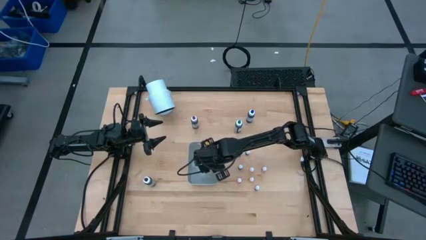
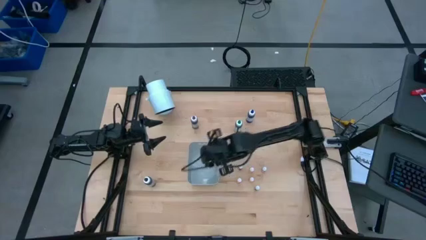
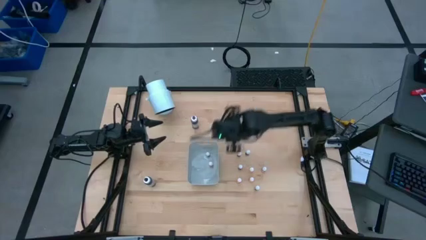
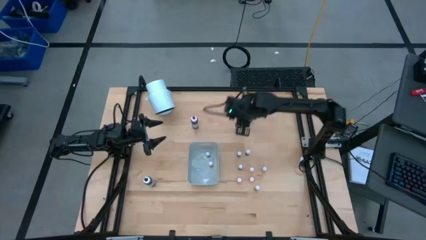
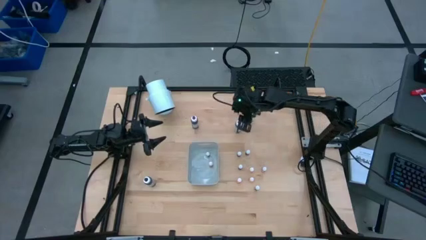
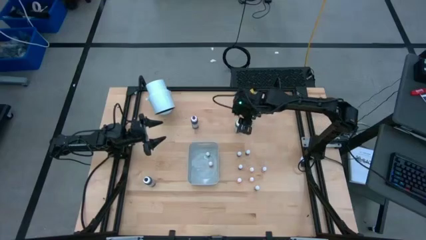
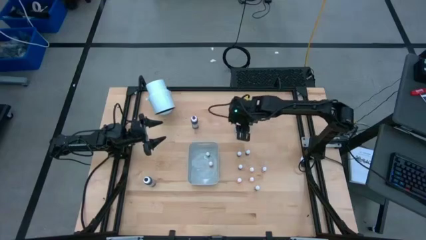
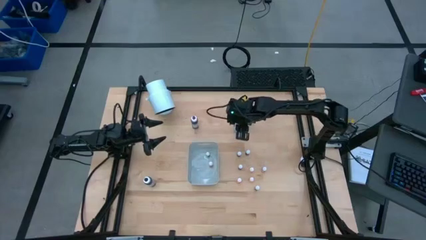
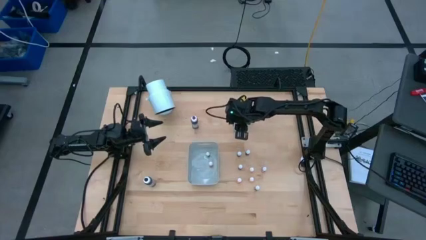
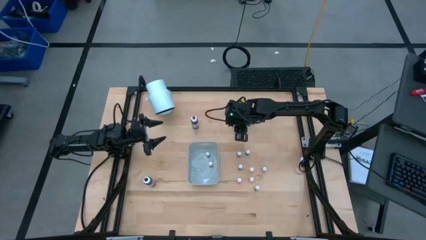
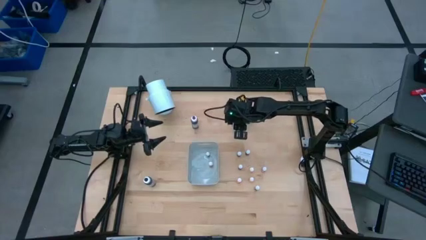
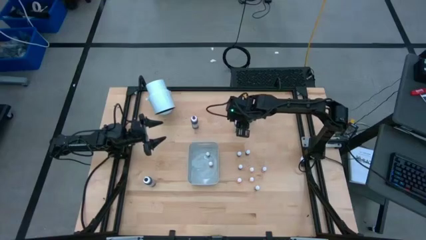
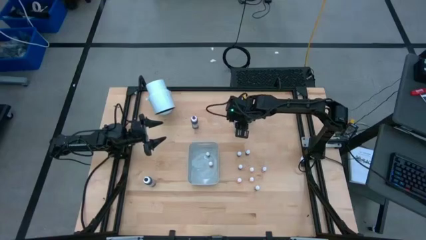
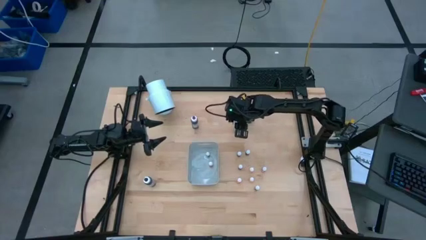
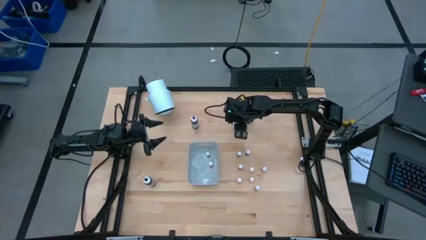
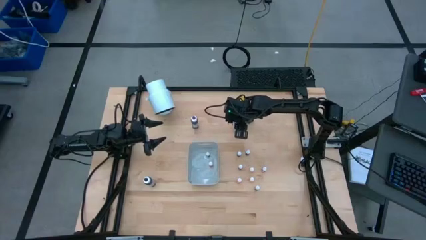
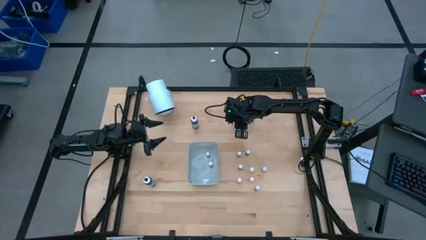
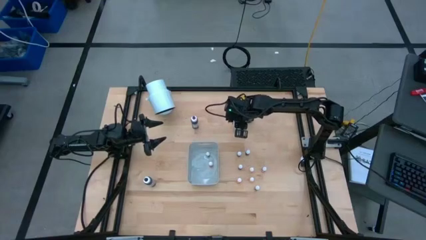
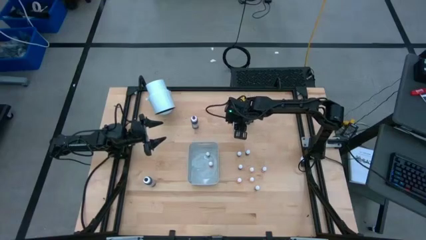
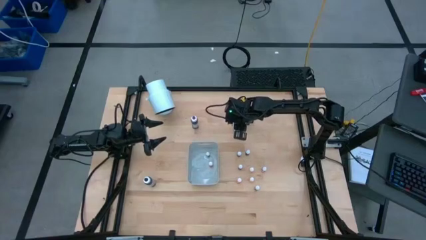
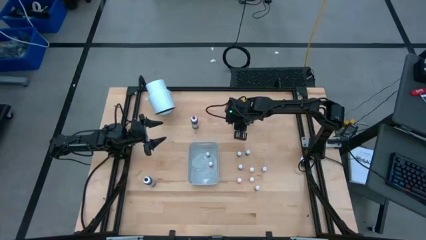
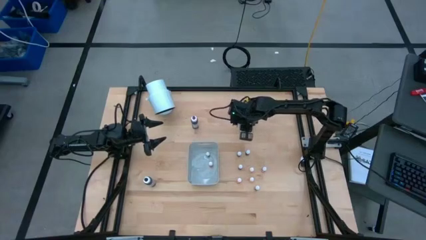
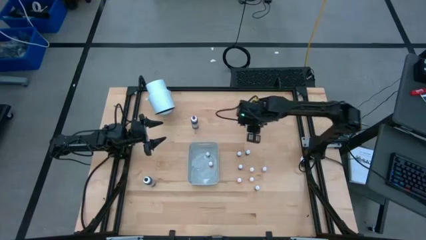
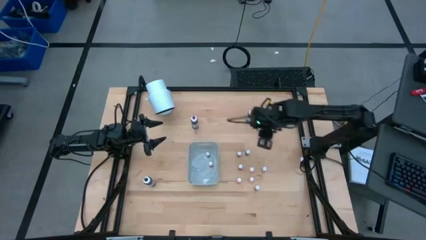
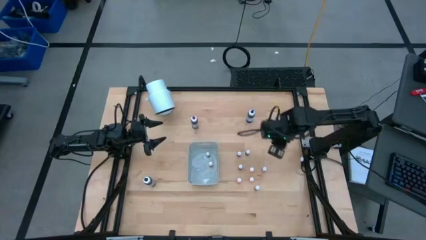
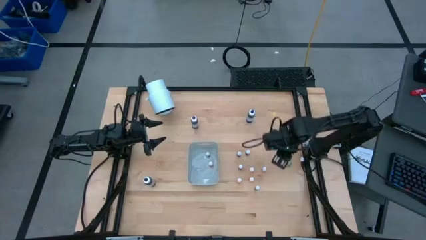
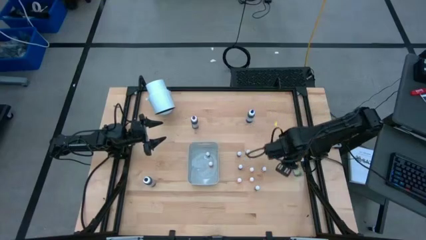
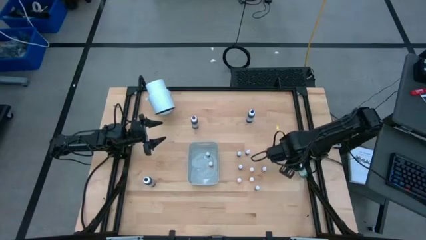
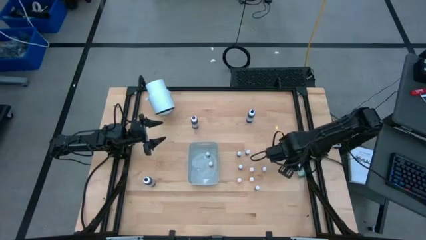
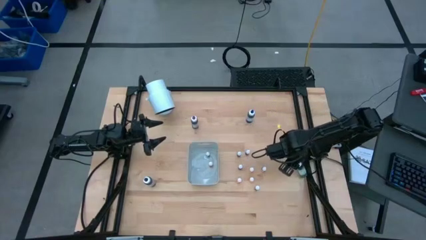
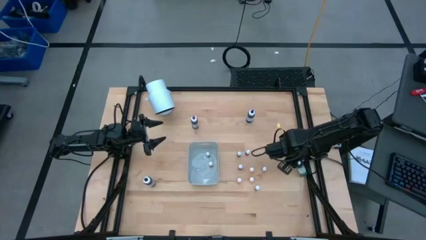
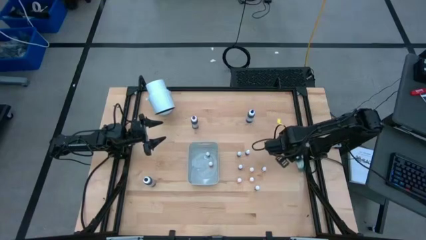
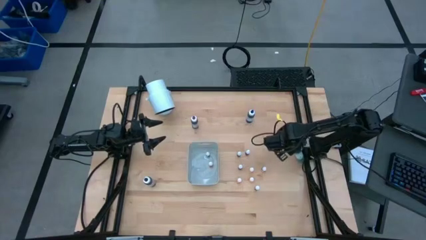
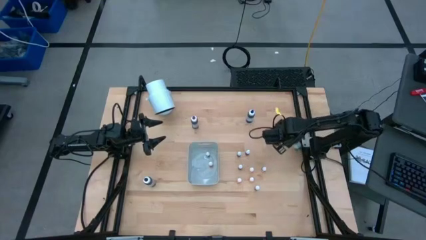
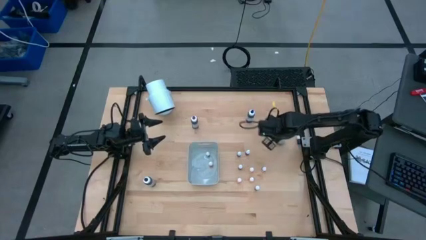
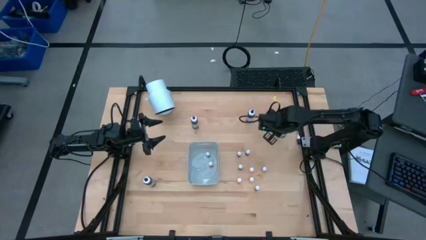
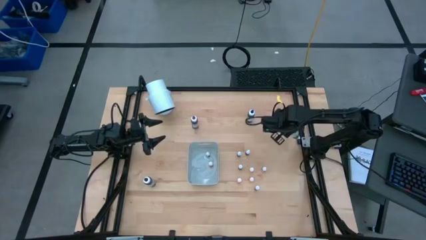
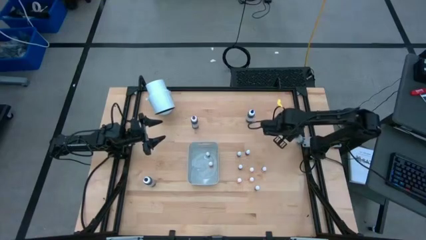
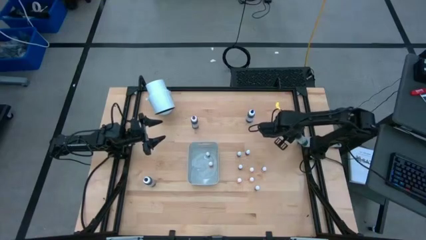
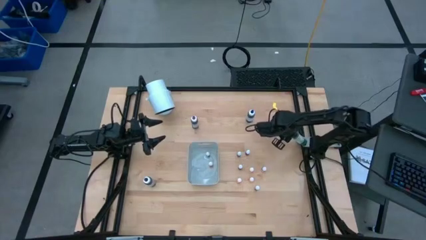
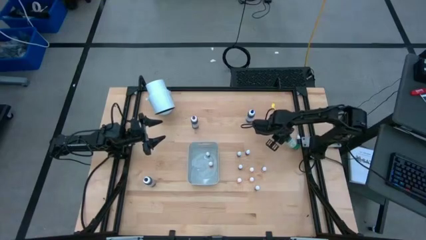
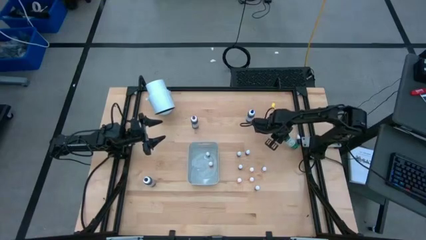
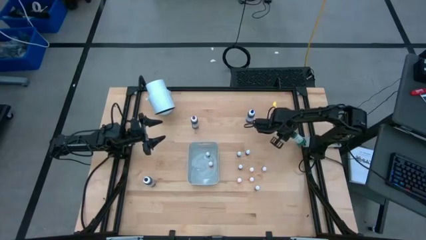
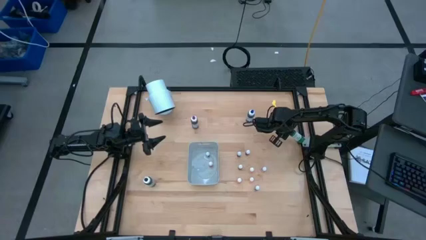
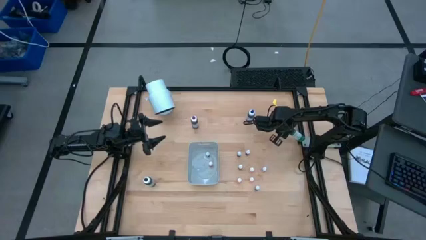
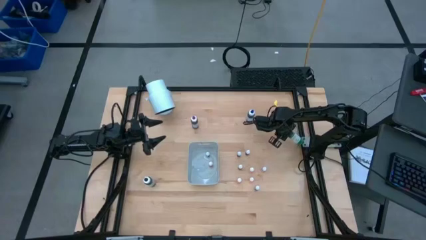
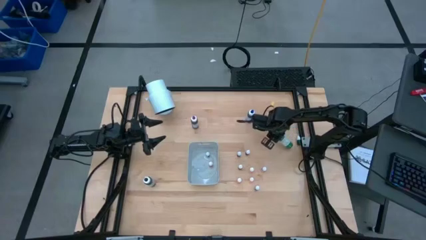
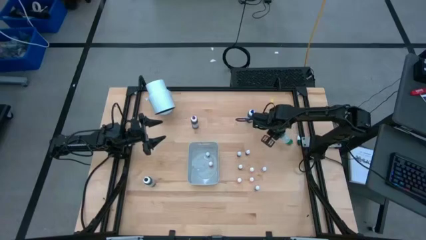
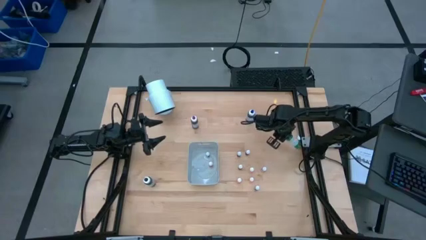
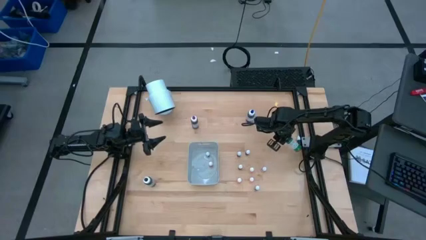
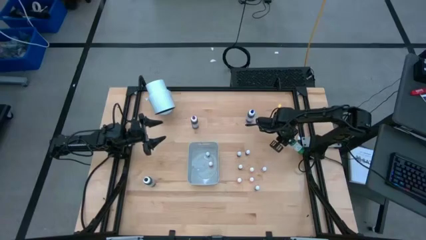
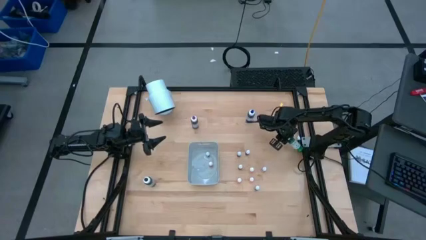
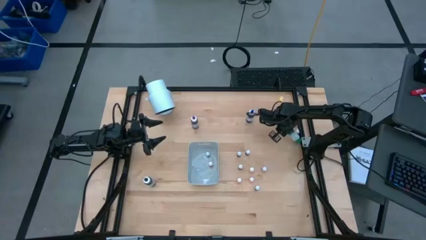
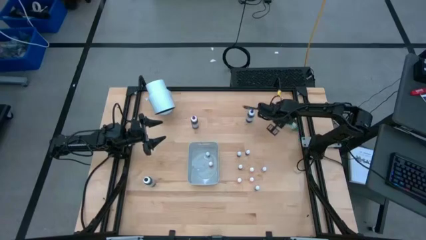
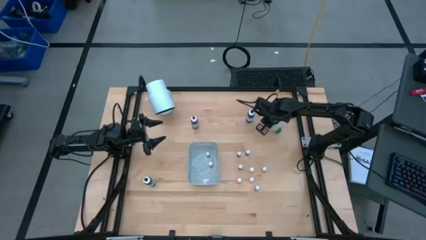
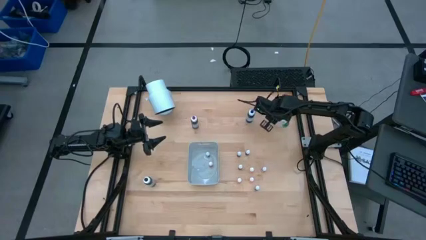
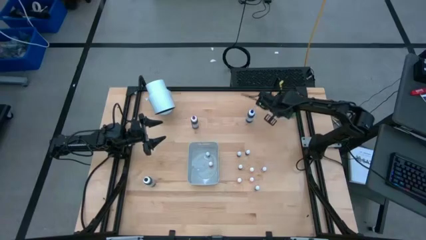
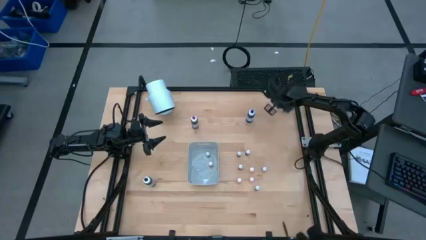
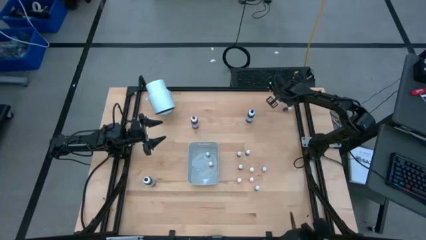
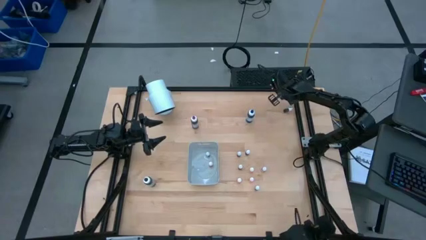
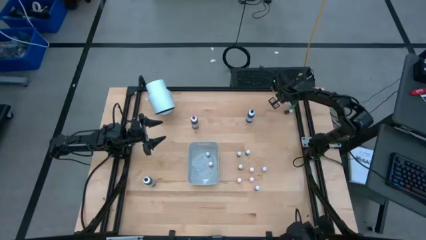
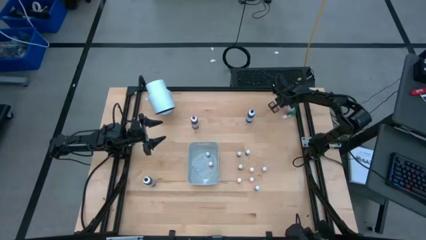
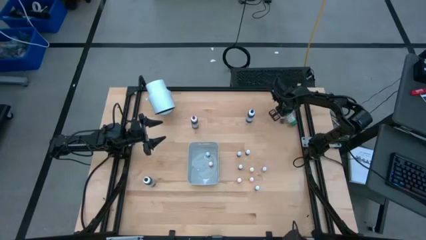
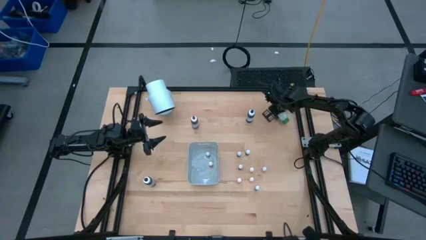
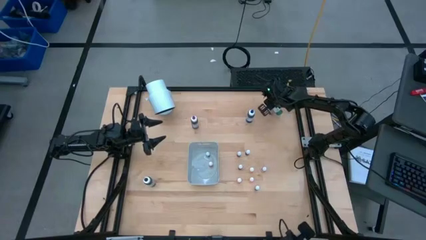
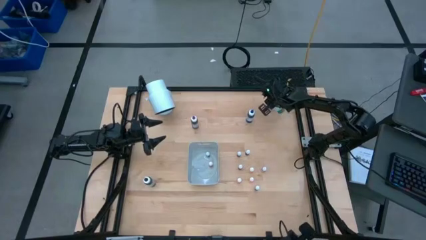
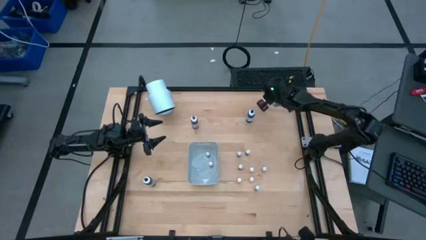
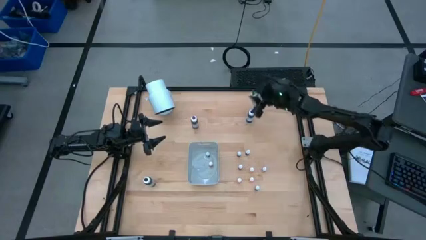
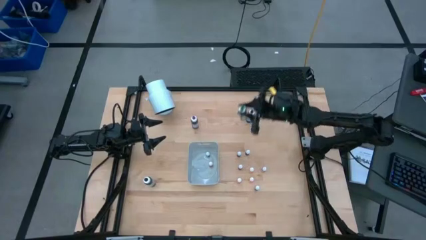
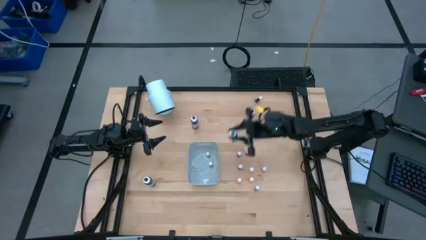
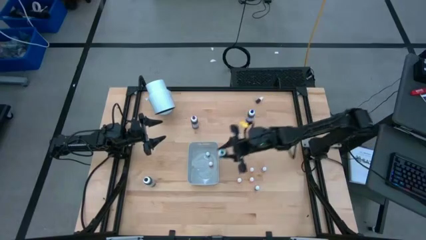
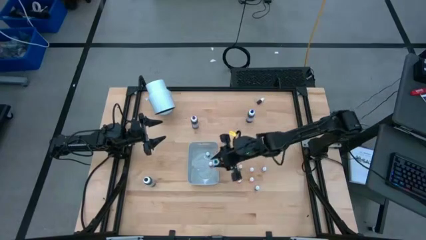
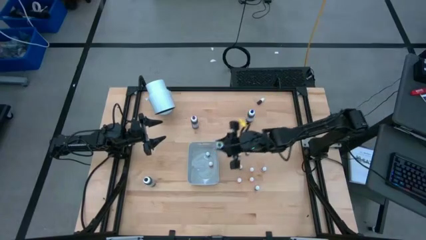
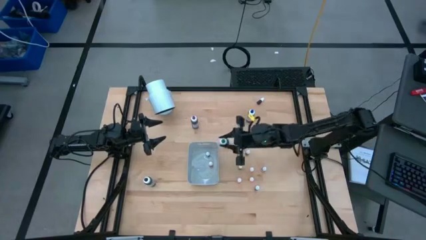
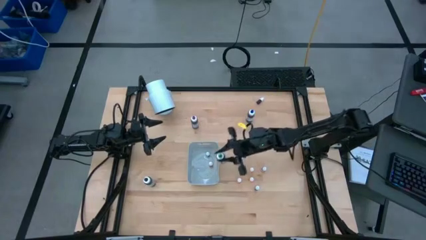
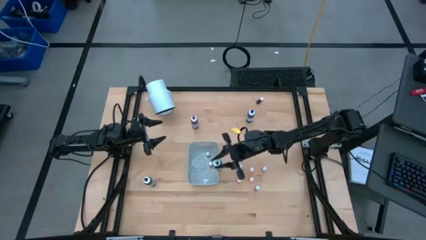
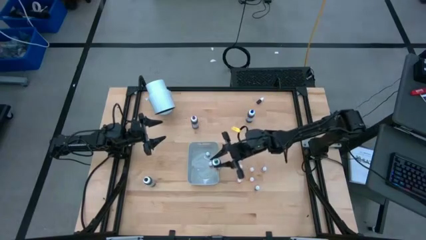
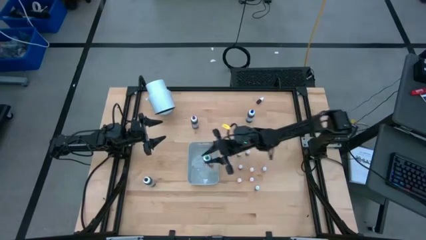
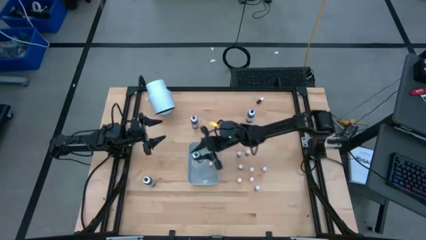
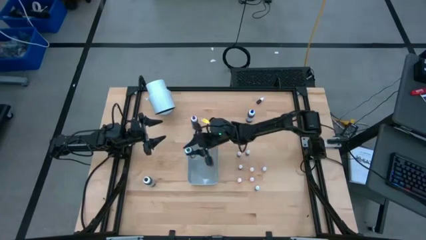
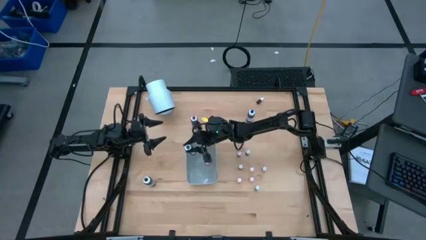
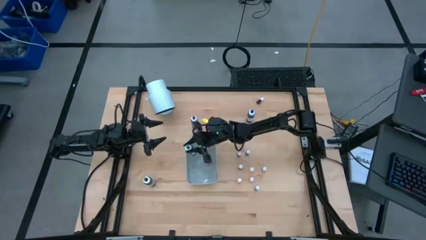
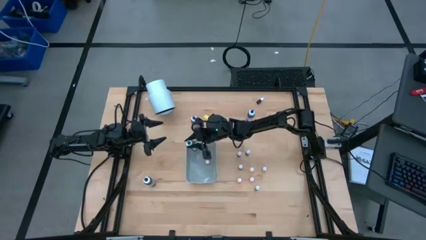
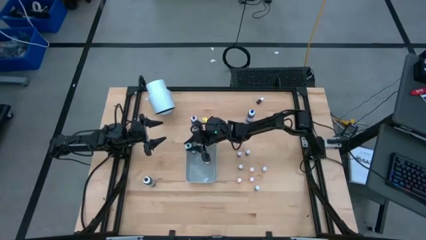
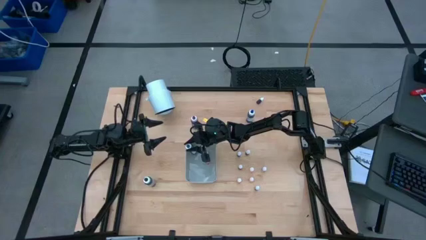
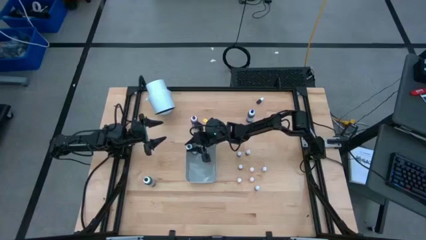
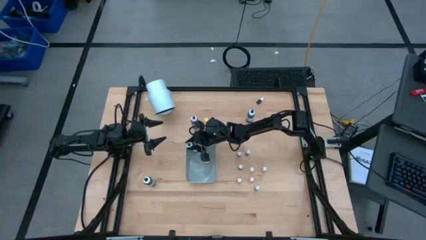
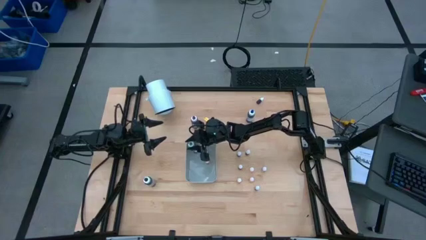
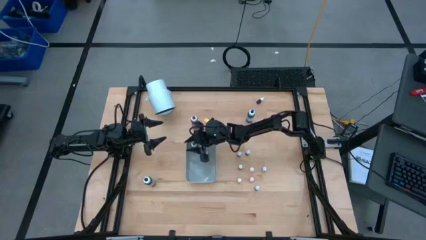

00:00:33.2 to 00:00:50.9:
Task: Pick & Place food coloring
Put the big green food coloring bottle into the bin
